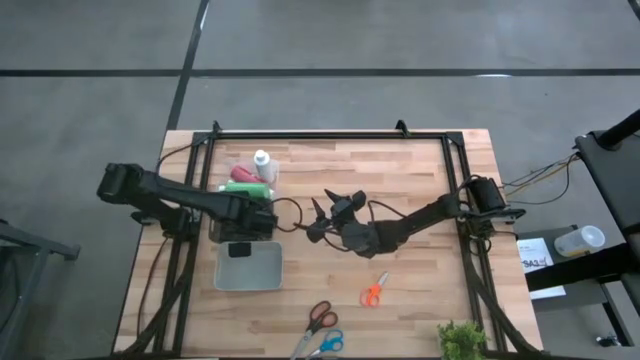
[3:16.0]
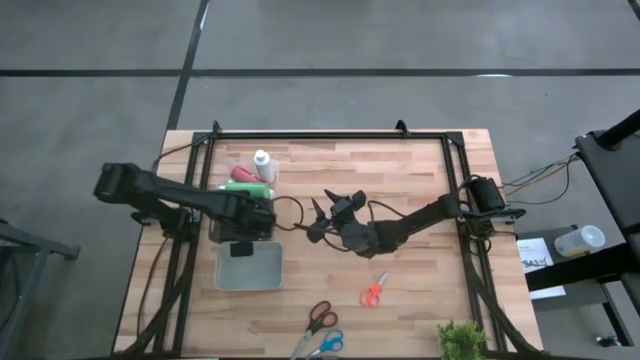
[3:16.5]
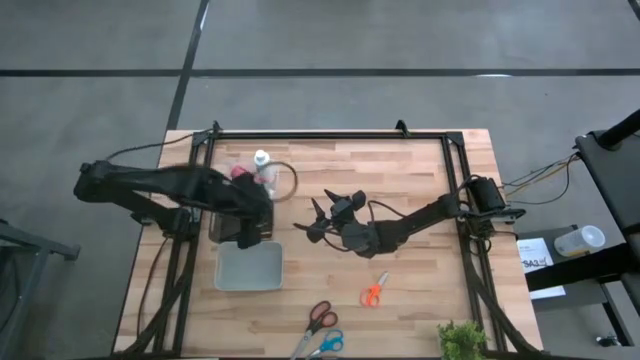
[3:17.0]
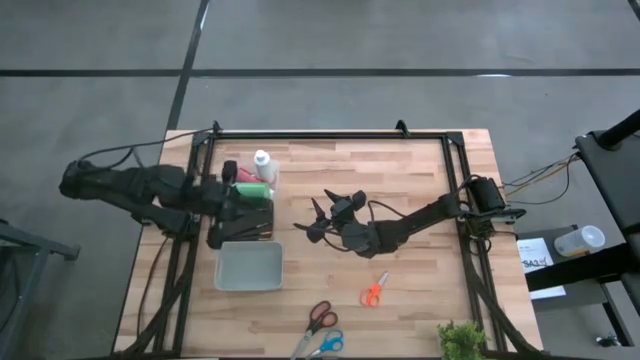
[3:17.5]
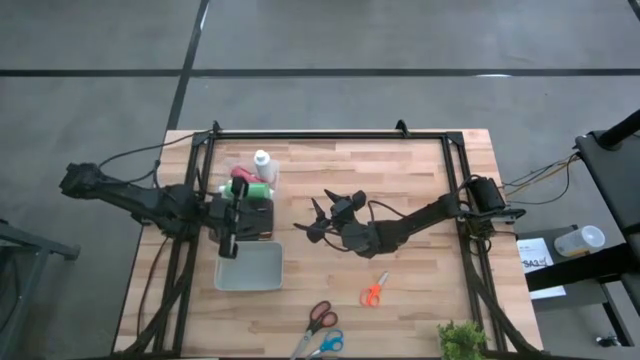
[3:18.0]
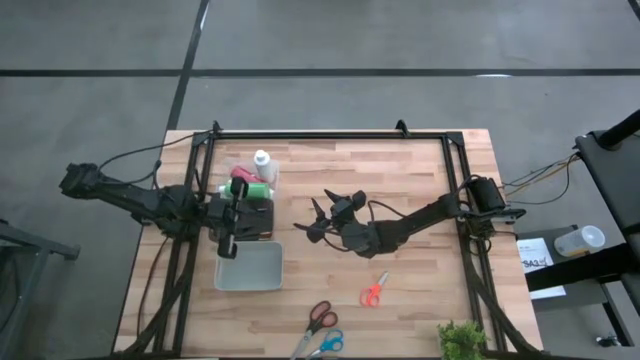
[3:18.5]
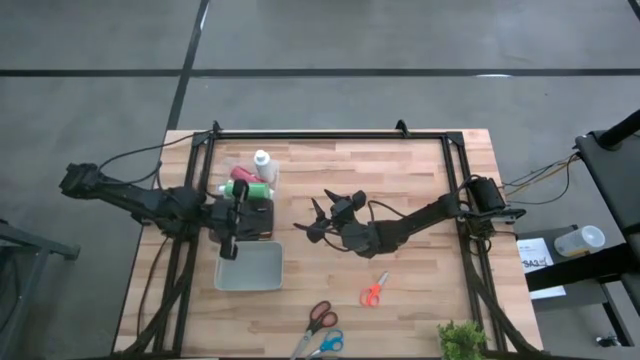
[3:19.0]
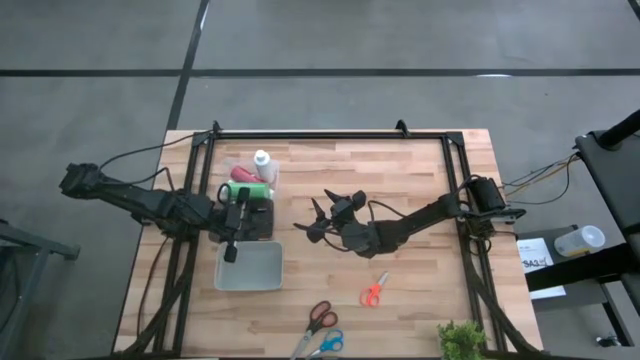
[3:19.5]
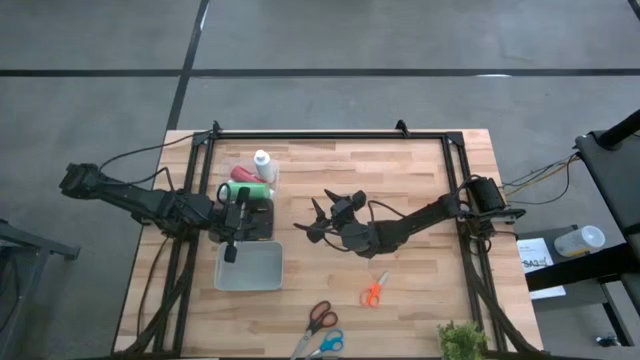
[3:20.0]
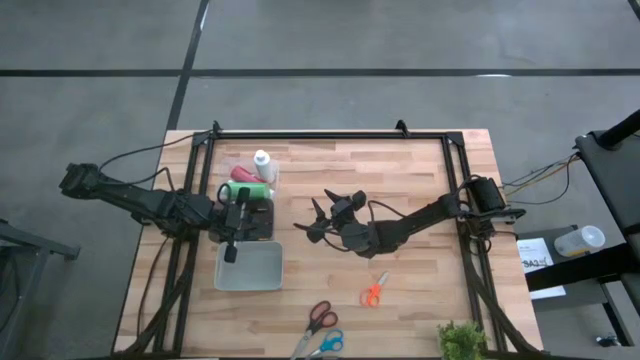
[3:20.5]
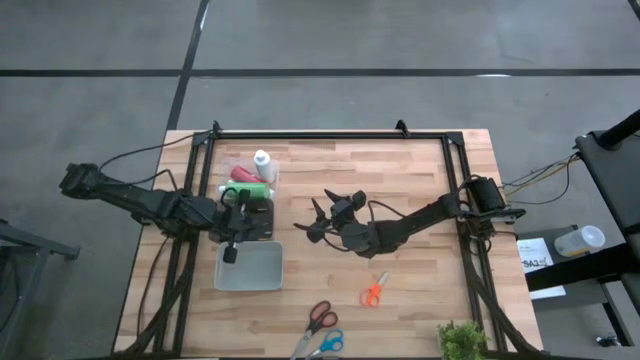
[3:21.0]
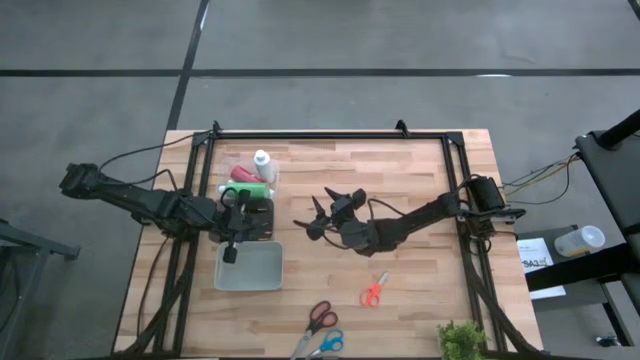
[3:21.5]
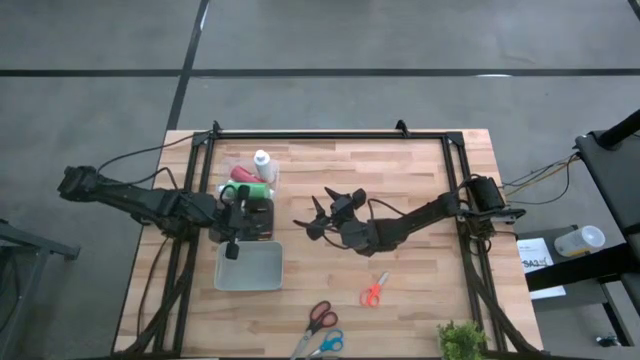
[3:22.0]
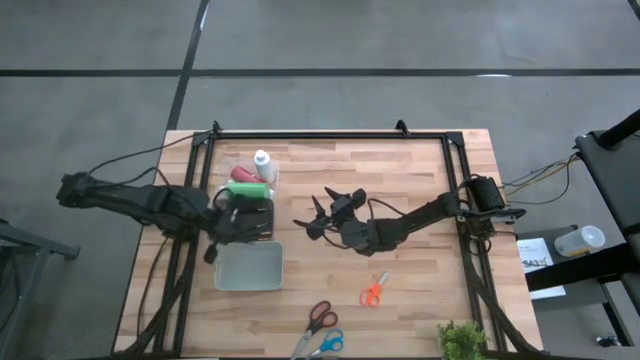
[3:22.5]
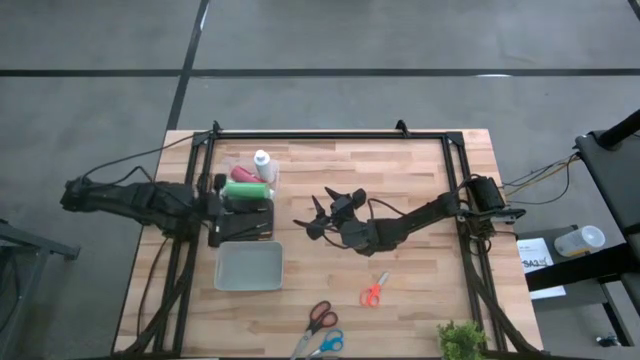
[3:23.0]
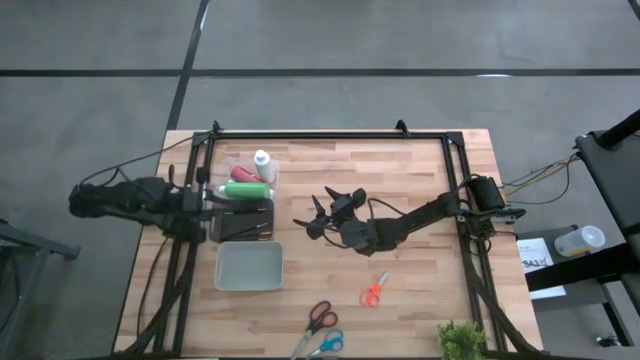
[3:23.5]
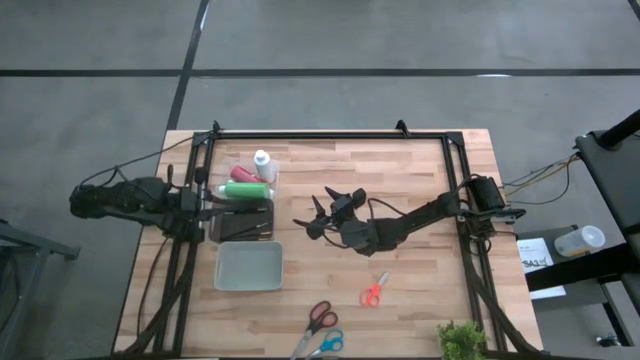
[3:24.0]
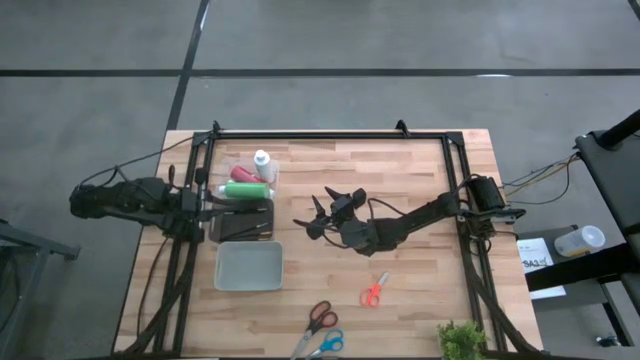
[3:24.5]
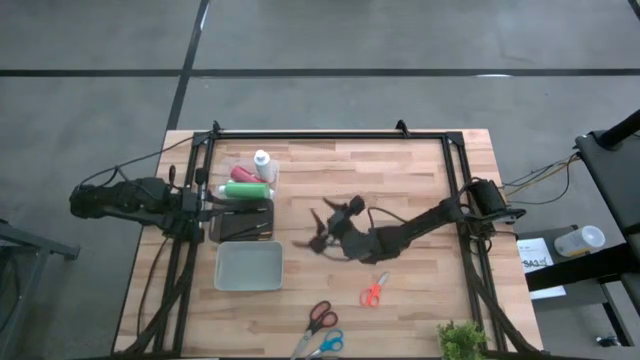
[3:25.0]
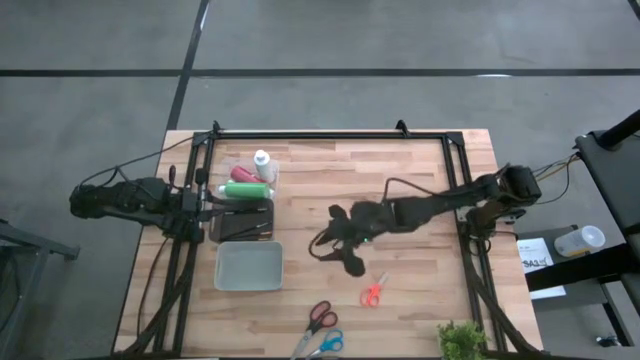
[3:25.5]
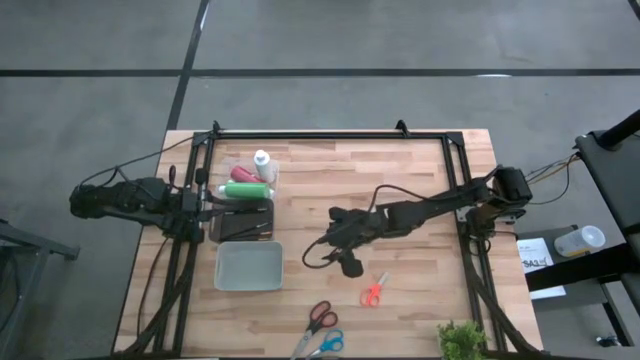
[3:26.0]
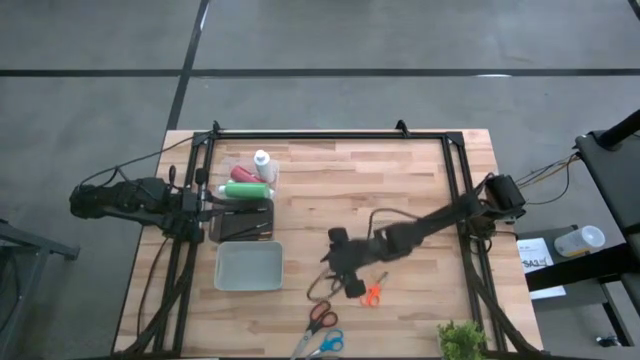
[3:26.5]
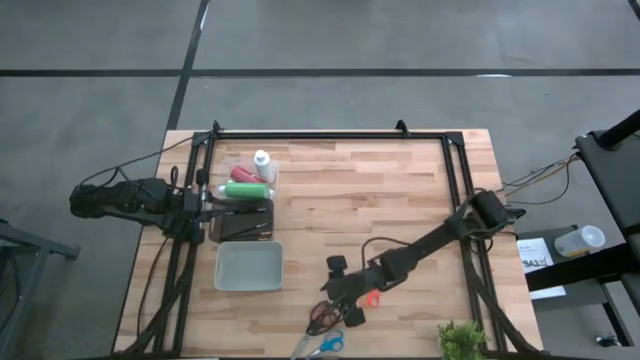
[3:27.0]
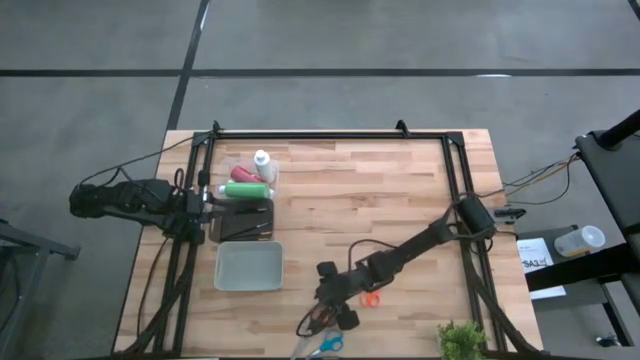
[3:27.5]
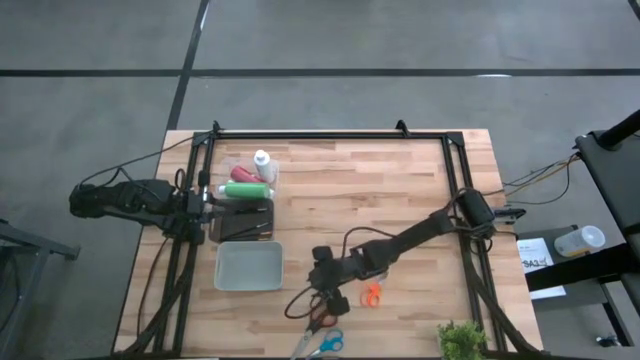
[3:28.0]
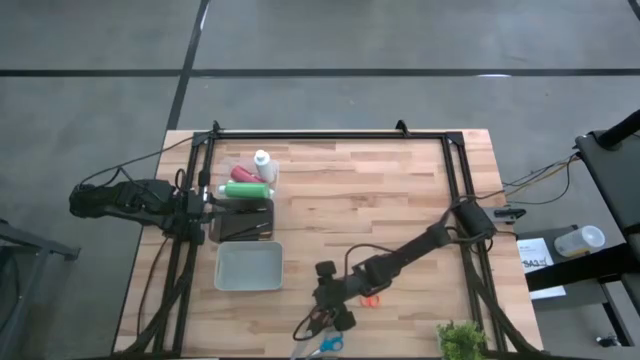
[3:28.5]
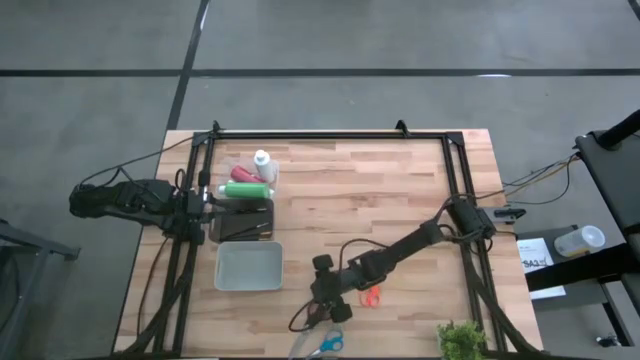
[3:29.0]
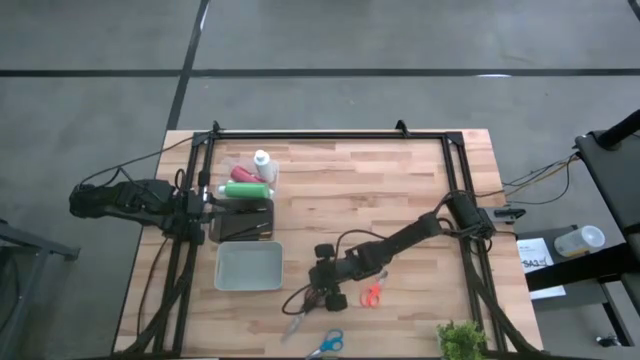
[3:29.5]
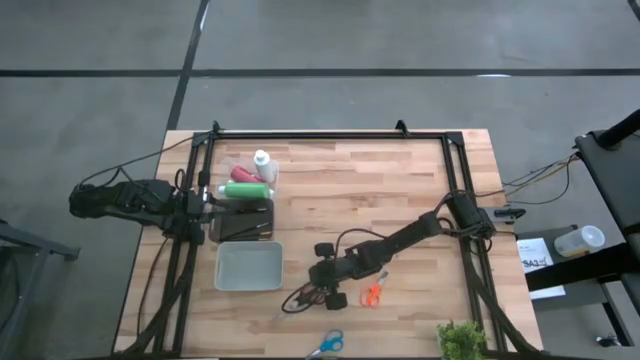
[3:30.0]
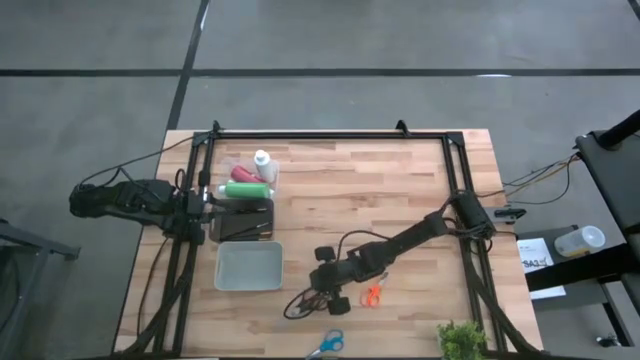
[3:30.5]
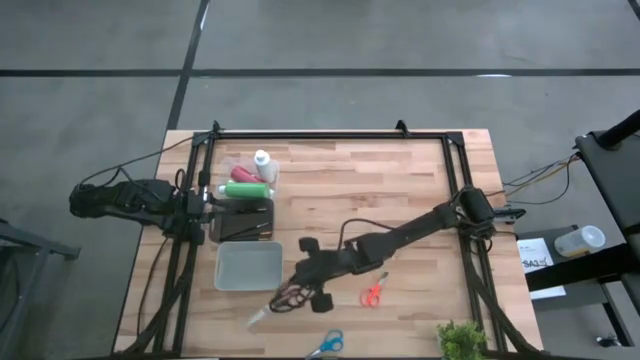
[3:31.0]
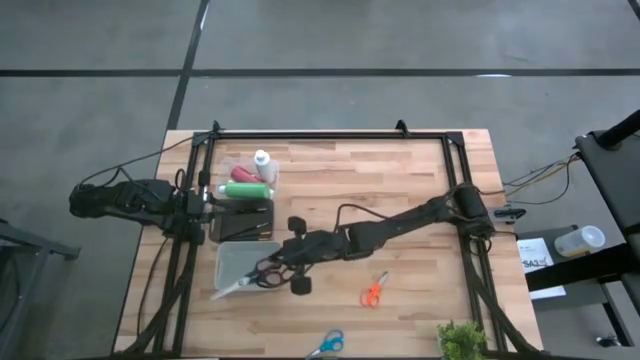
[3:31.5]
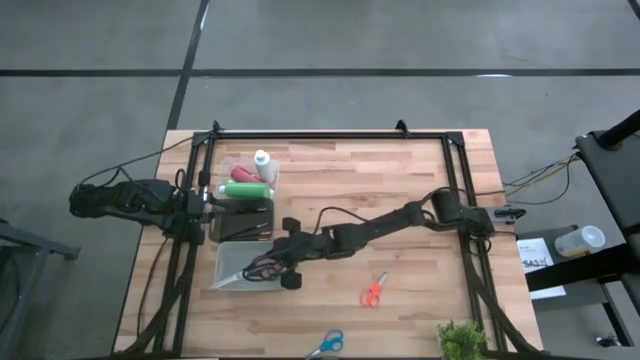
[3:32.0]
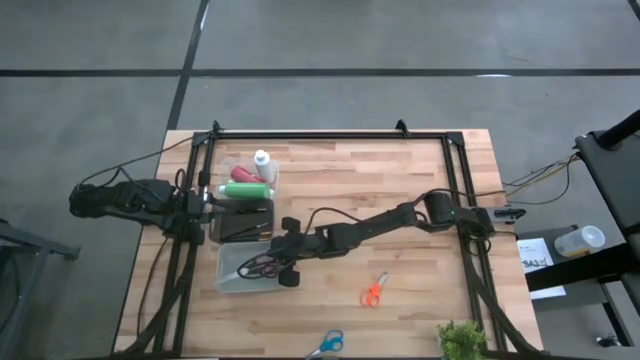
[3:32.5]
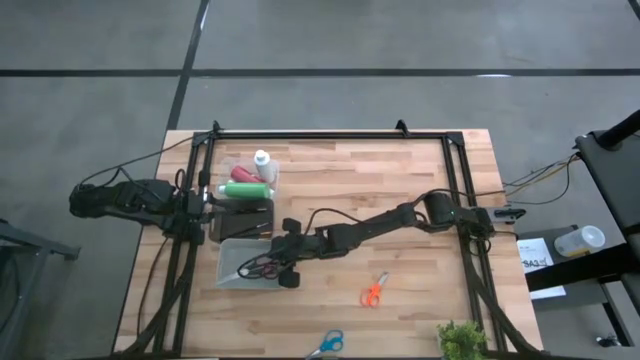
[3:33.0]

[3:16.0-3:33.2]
Task: Pick & Place Paint Supplies
Put the black scissors into the gray bin

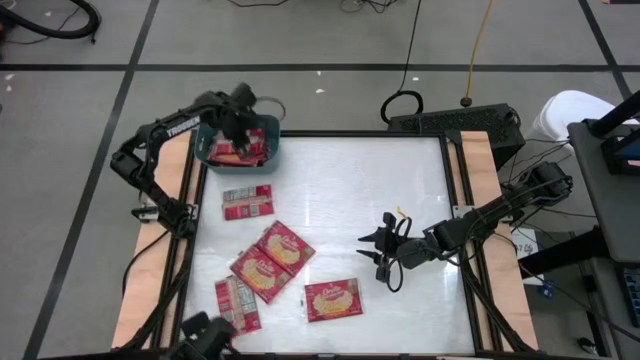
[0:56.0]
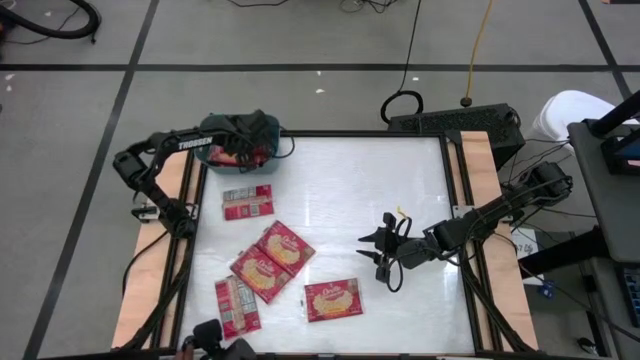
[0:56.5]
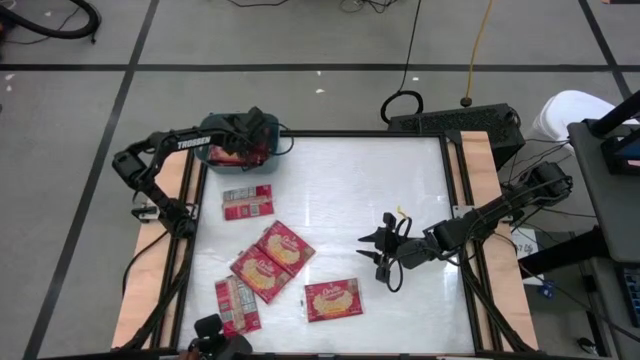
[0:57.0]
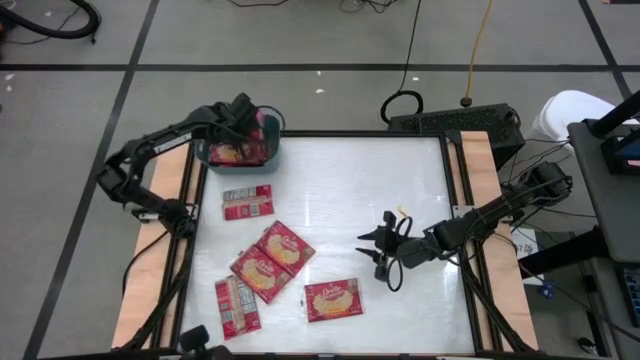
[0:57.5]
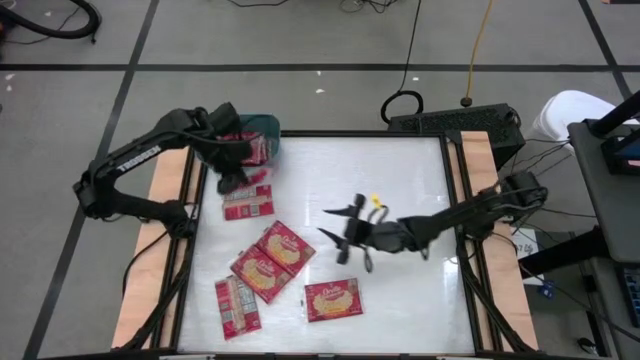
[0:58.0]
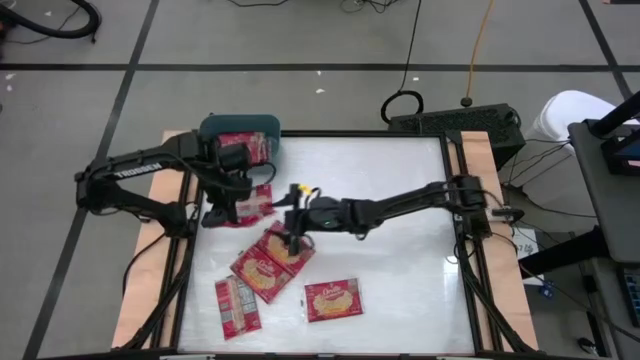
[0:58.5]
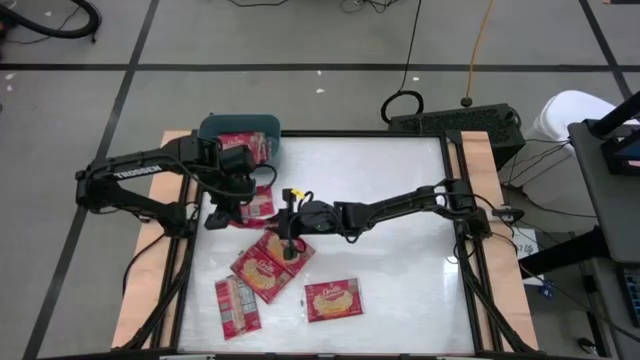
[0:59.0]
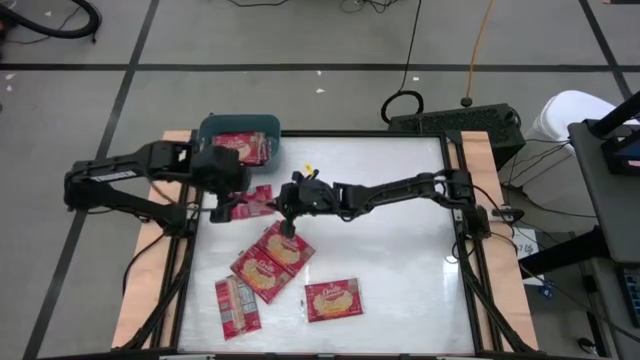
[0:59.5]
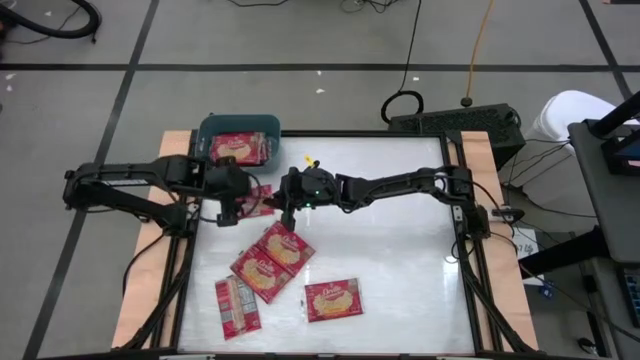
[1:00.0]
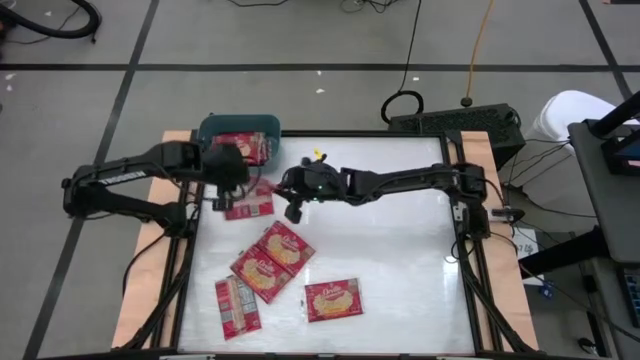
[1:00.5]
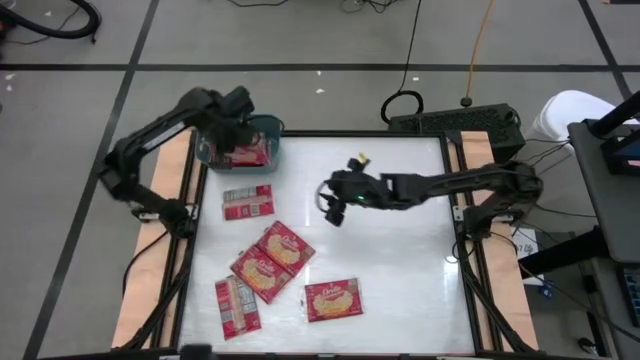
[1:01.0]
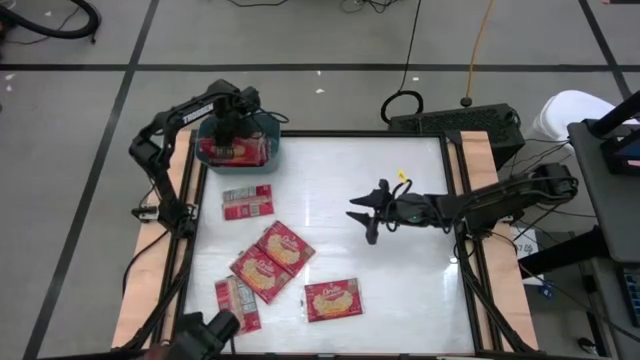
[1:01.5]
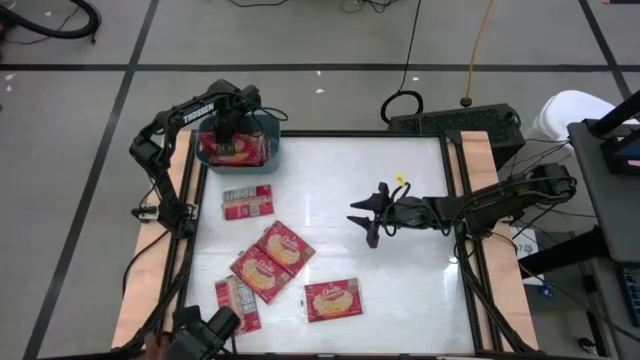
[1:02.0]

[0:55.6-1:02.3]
Task: Sort popcorn bags into baskets
Put the red popcorn bag into the blue bin
